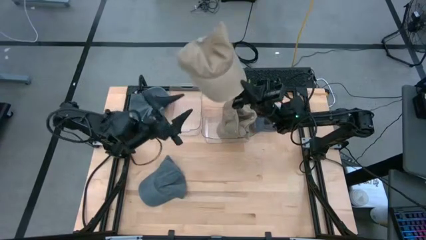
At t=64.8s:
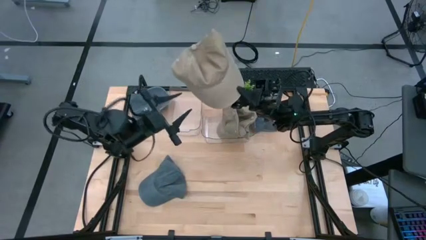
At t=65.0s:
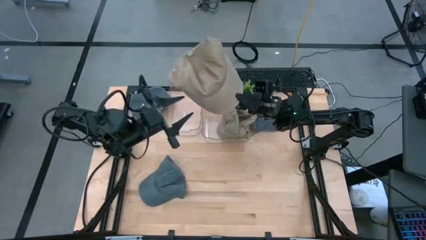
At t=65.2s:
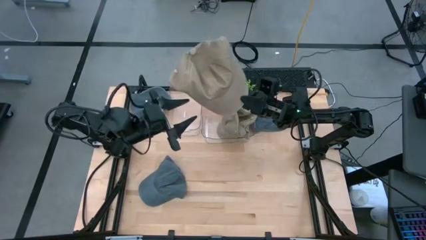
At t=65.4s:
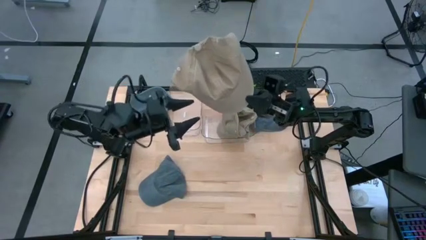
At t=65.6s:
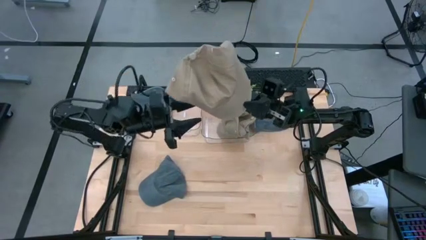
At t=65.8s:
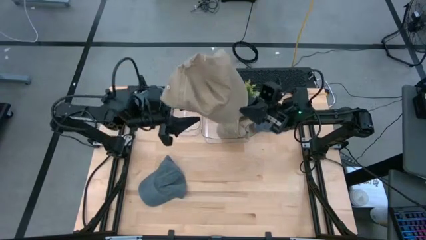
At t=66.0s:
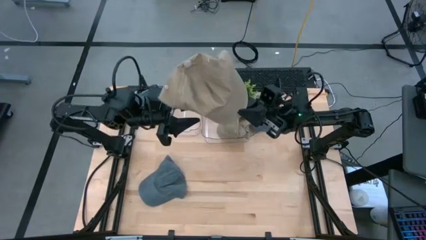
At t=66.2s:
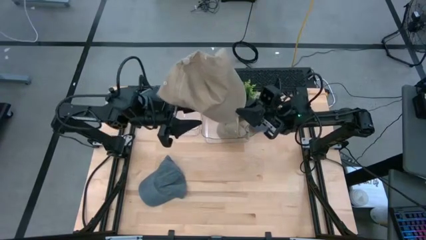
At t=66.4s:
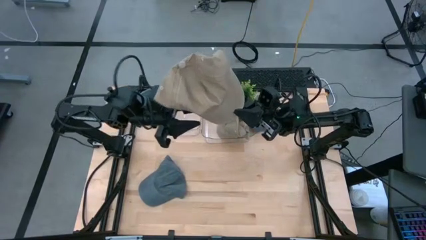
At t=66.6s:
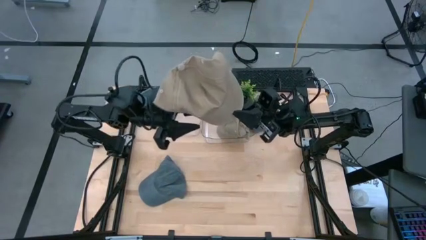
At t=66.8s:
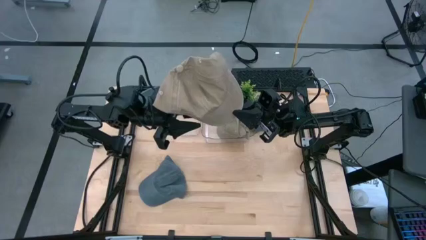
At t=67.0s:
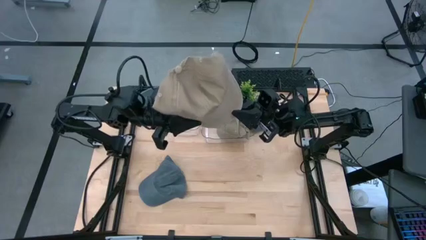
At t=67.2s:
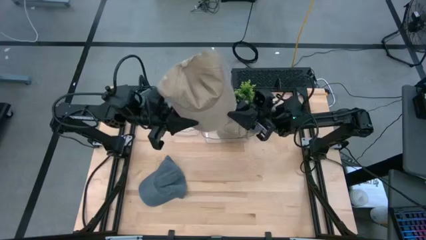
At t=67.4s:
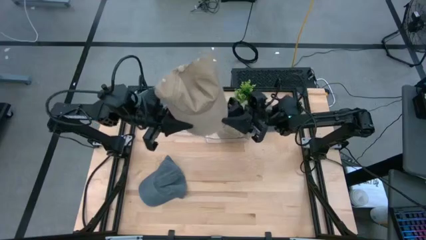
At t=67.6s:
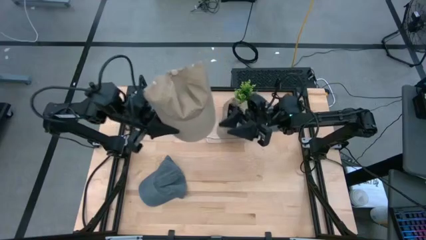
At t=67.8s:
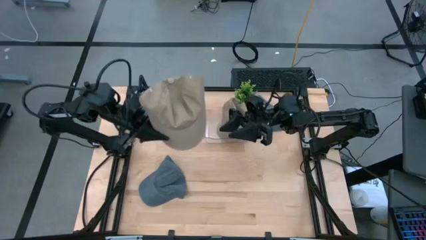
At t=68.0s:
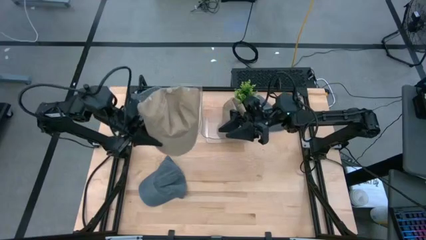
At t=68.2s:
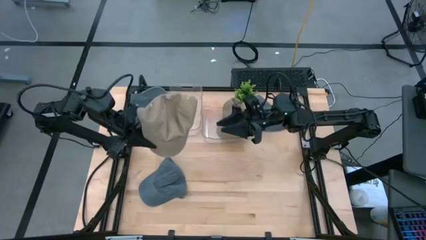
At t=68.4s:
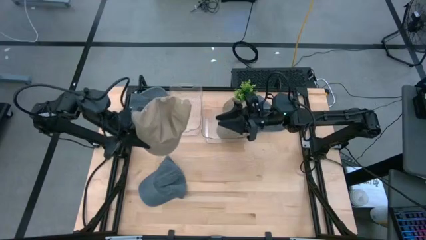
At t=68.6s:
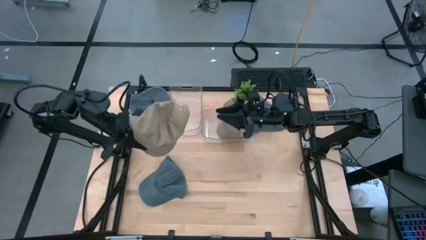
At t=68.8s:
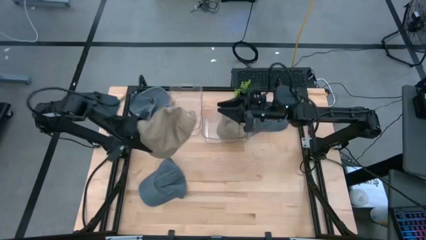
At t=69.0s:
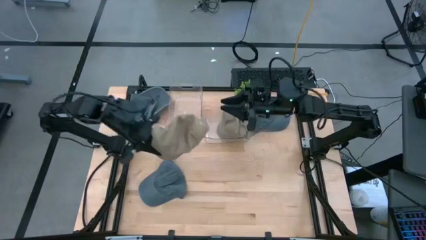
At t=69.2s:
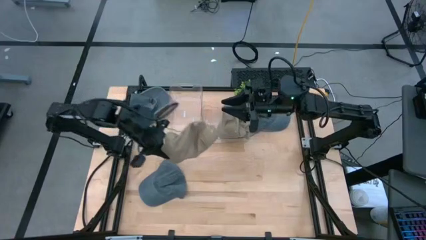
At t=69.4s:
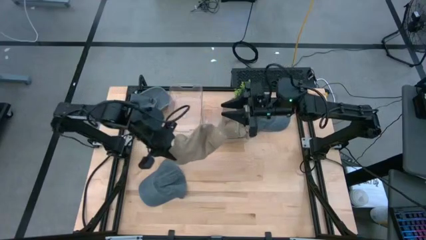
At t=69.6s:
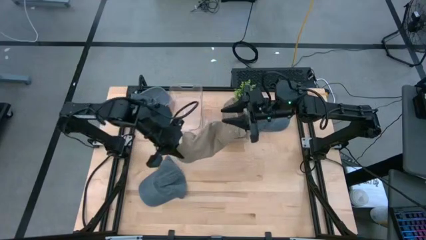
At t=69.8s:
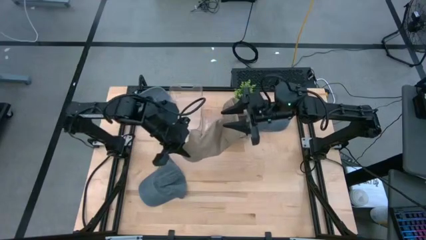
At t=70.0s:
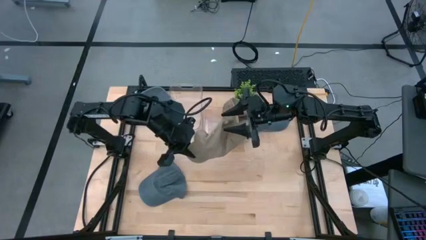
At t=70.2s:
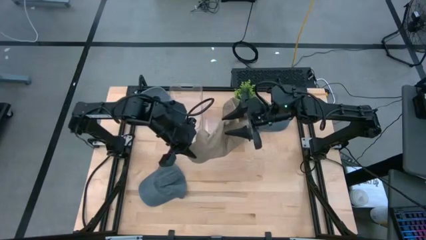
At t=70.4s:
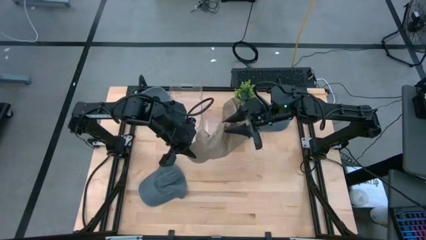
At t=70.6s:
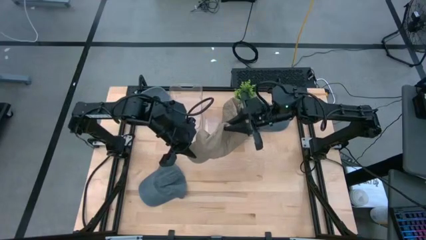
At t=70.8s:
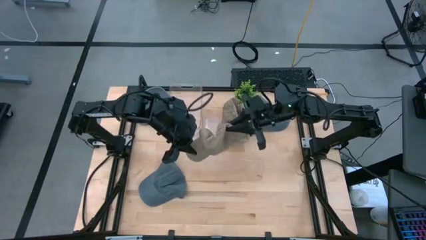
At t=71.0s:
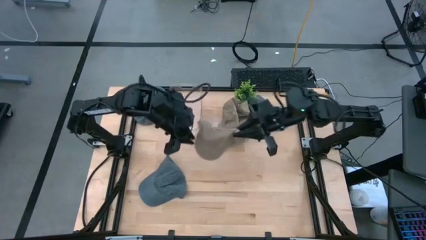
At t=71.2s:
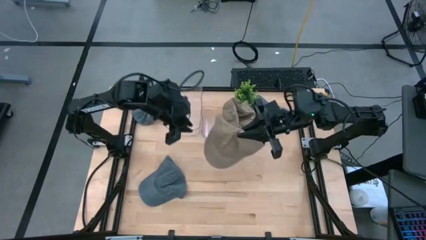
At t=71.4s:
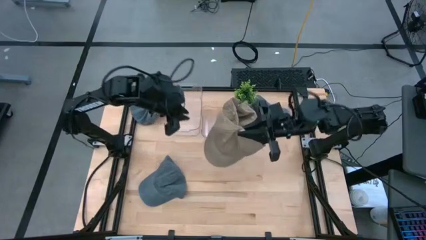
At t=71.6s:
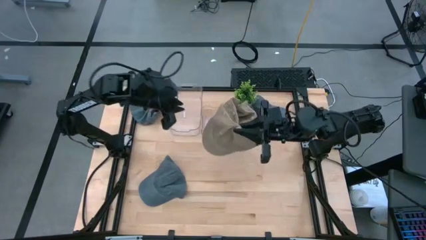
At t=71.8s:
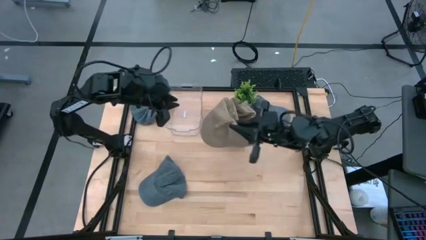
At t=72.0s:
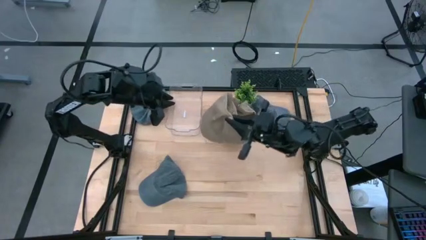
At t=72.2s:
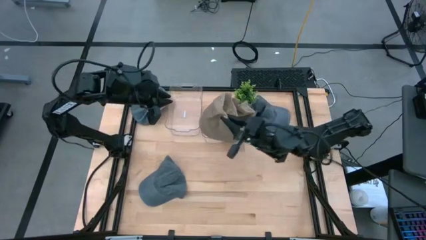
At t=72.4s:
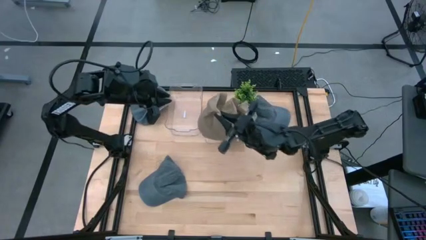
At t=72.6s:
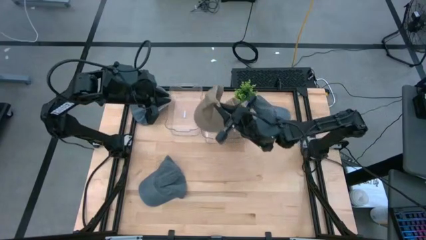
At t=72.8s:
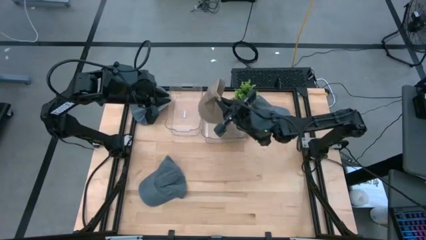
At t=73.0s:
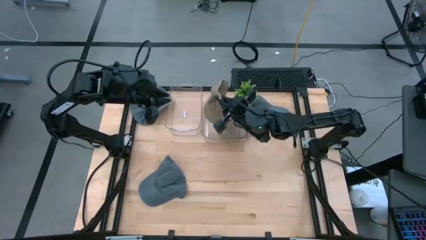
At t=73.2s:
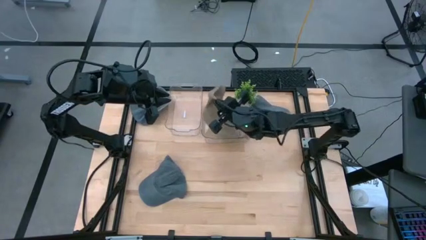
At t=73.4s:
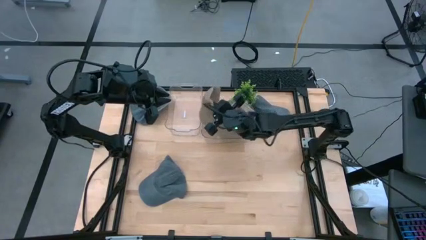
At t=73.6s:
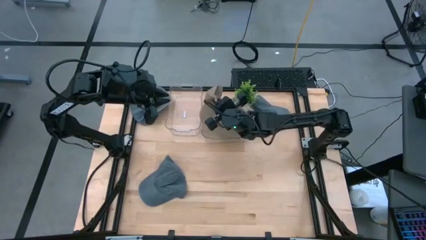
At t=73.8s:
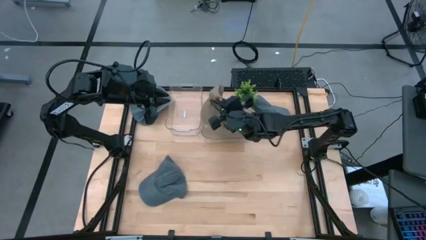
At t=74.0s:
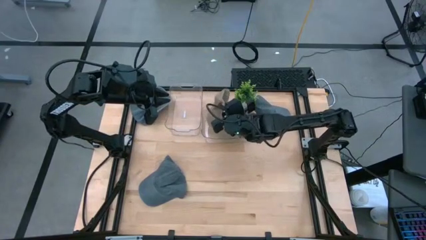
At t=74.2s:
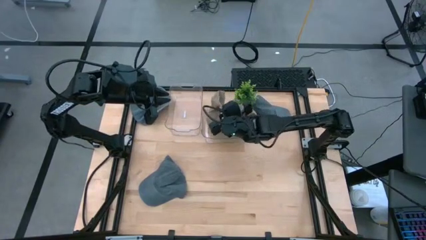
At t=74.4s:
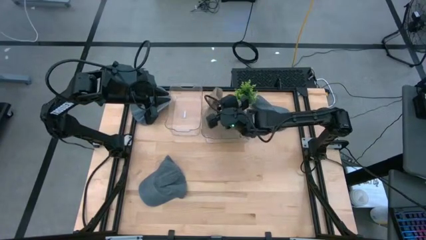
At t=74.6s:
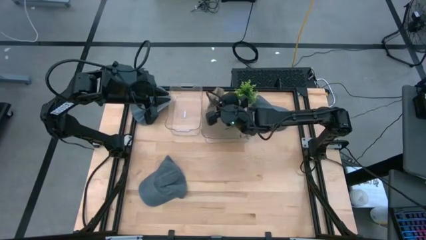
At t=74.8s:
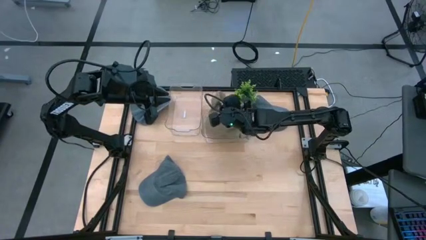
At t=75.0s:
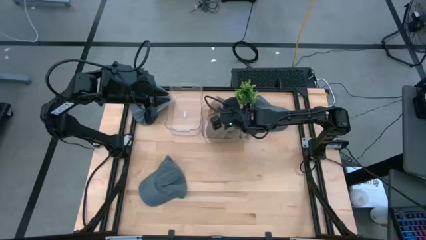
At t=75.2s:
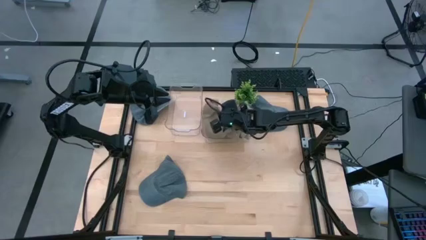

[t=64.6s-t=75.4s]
Task: Pick & Place hat
Put the brown cap into the right transparent bin
